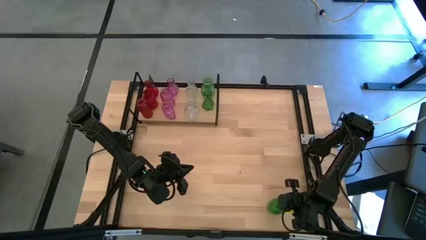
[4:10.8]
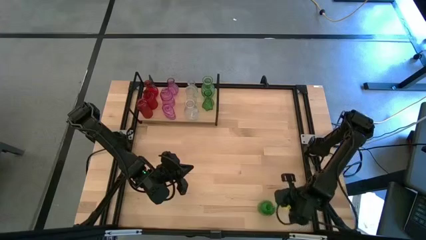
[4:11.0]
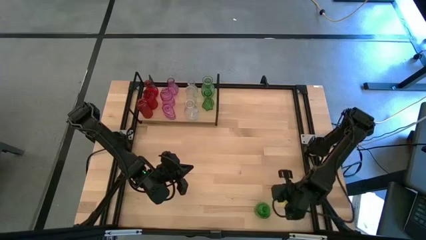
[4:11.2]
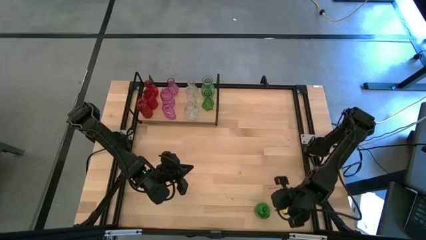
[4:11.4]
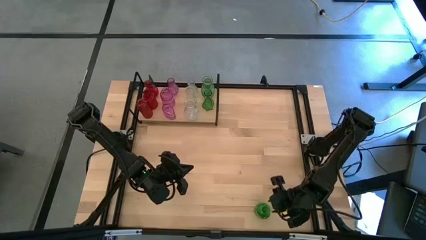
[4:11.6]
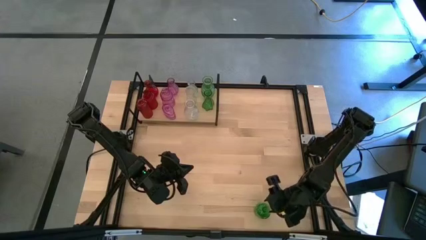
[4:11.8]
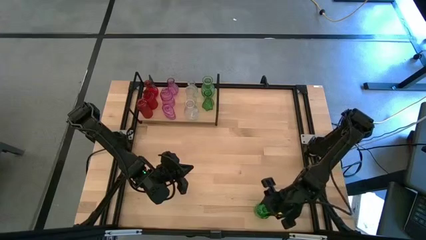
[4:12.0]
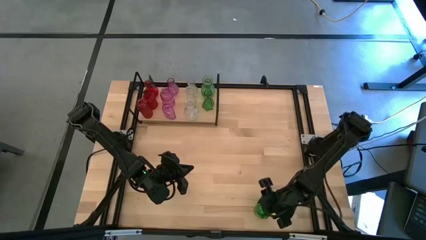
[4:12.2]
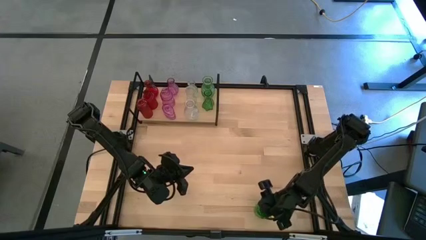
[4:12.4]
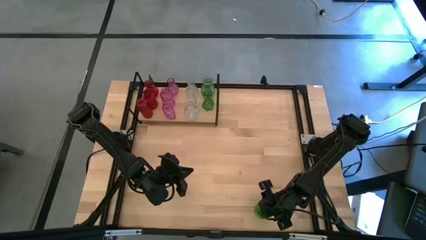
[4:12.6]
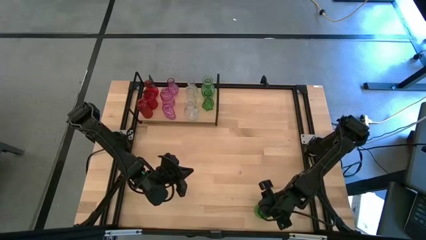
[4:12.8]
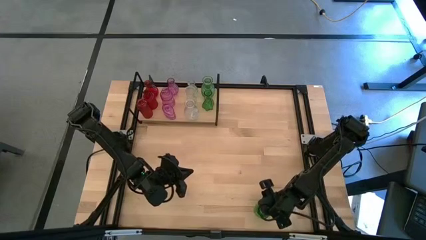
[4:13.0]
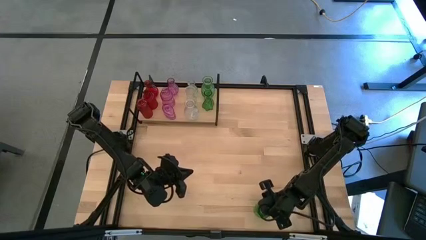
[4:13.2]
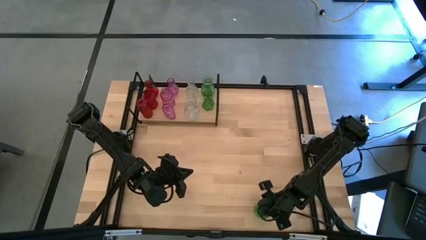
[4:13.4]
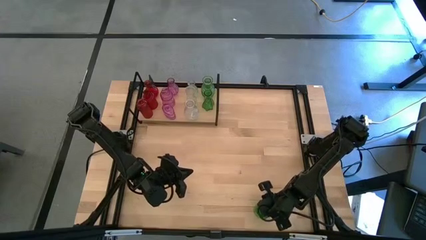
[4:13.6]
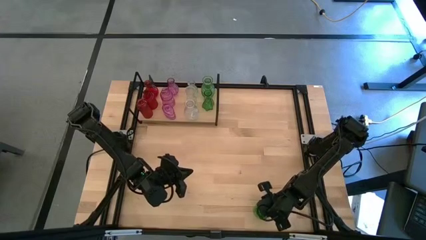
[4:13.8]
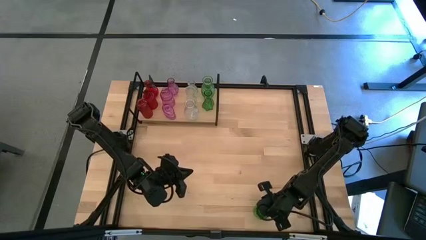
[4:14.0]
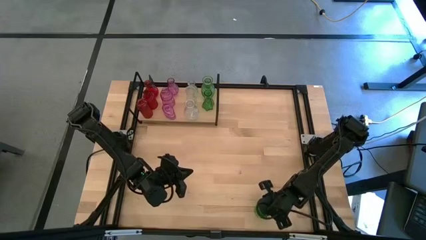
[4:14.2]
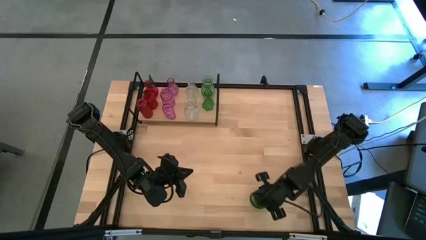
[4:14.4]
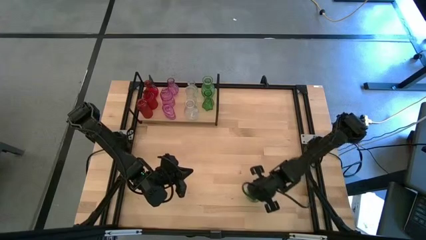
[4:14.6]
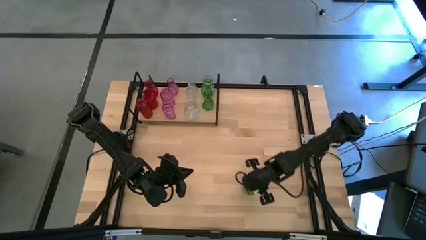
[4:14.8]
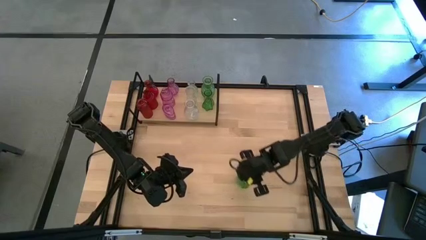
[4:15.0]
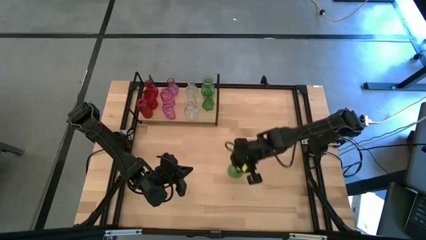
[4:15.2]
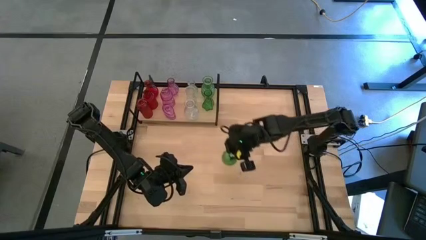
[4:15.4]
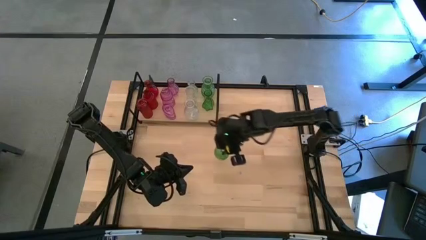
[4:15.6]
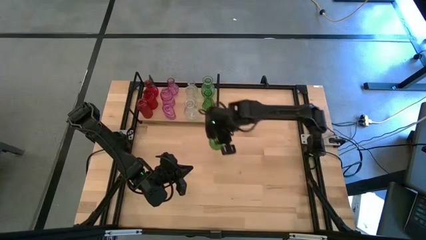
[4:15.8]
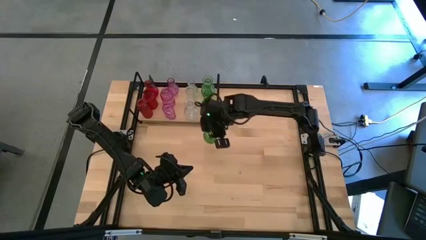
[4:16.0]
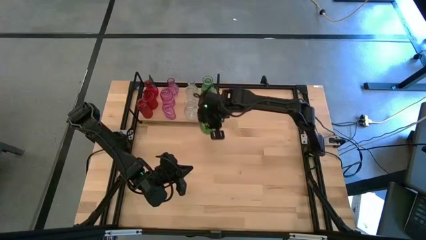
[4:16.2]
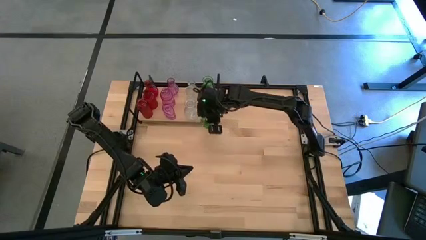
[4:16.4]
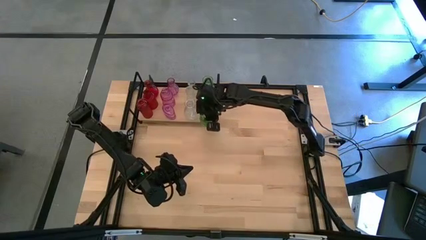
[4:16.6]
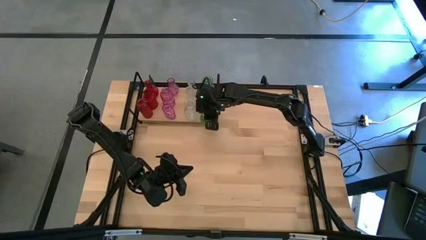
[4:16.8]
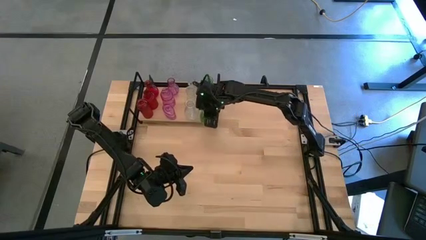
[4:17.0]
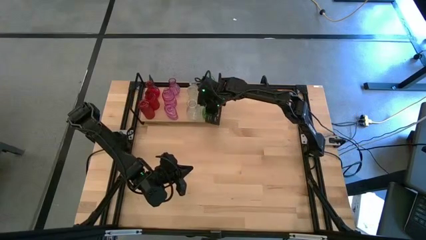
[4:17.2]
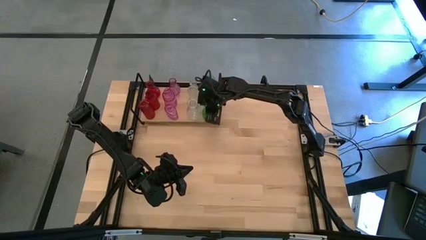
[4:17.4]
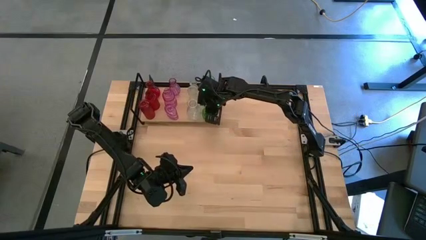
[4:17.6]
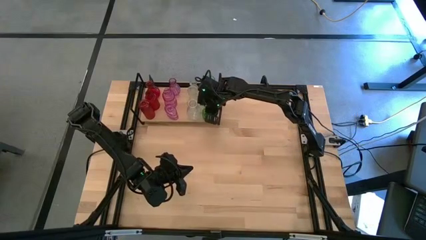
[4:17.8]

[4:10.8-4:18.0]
Task: sort vases onto shelf
Put the green vase on the shelf aligned with the other green vases

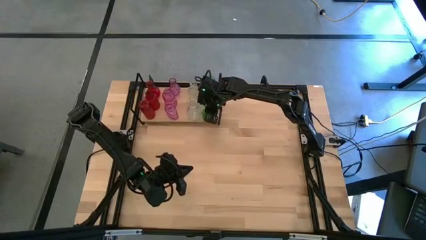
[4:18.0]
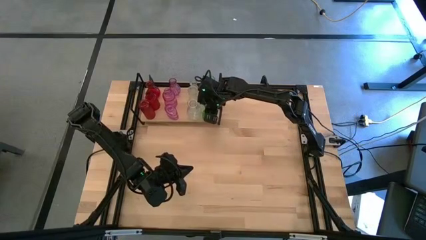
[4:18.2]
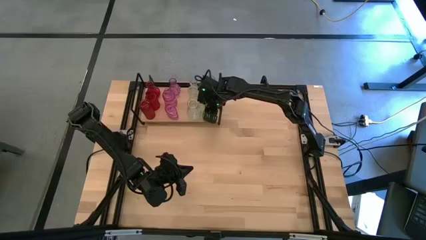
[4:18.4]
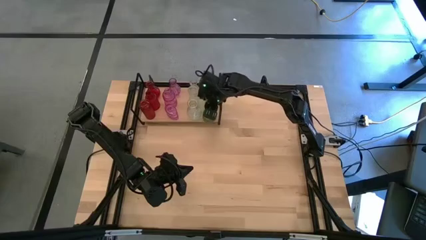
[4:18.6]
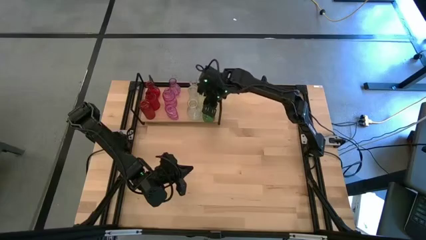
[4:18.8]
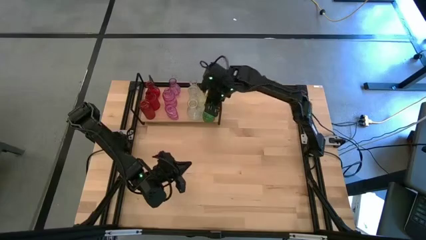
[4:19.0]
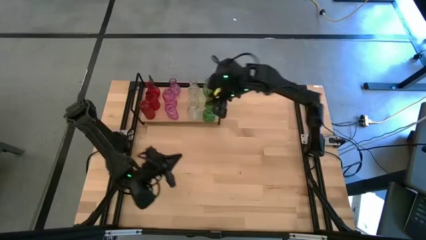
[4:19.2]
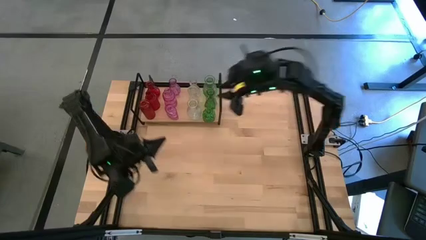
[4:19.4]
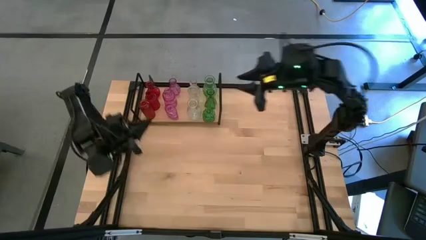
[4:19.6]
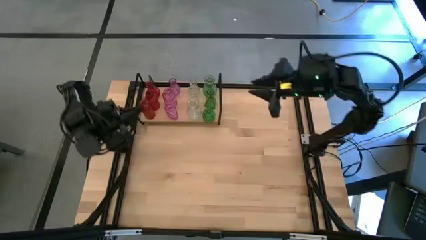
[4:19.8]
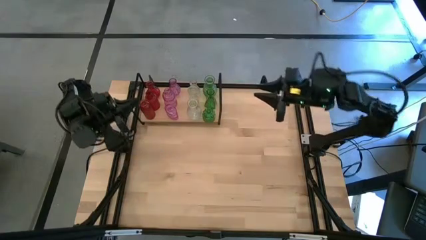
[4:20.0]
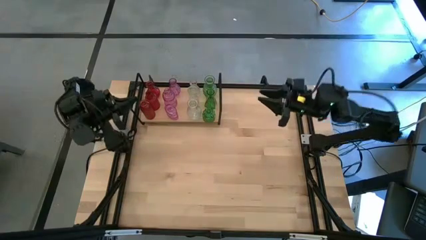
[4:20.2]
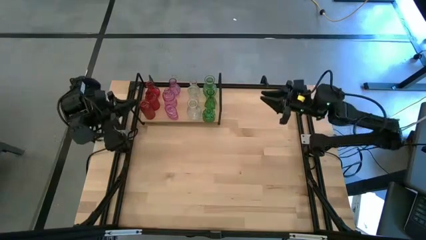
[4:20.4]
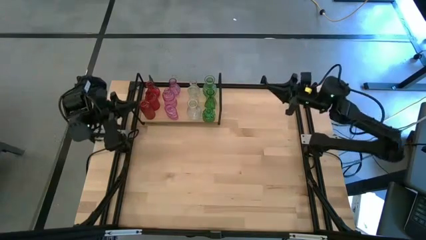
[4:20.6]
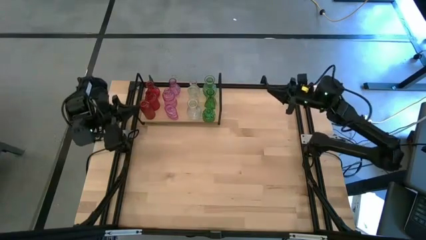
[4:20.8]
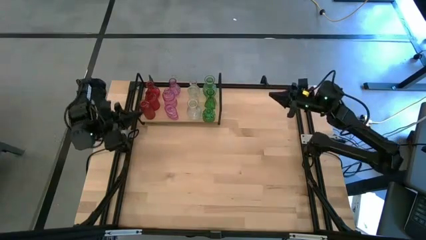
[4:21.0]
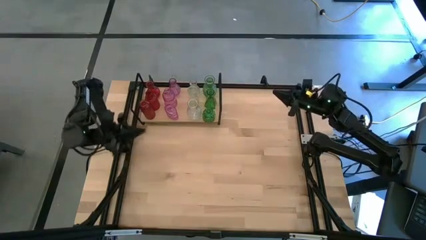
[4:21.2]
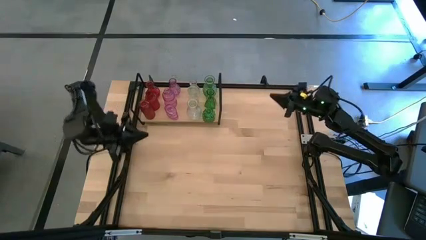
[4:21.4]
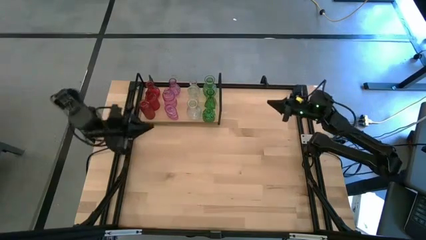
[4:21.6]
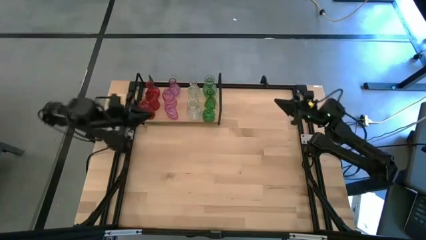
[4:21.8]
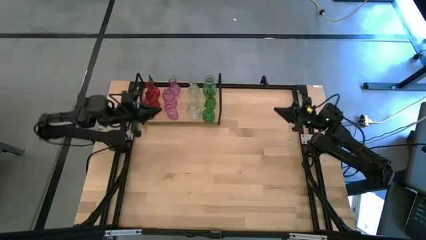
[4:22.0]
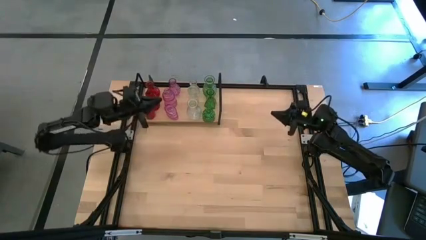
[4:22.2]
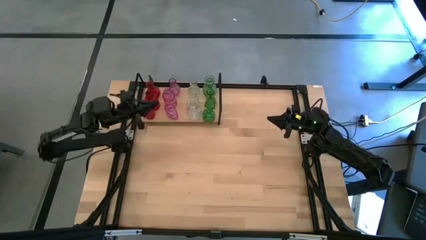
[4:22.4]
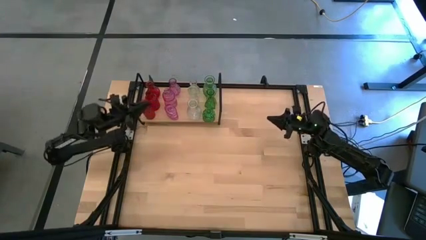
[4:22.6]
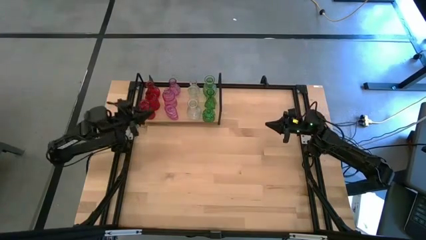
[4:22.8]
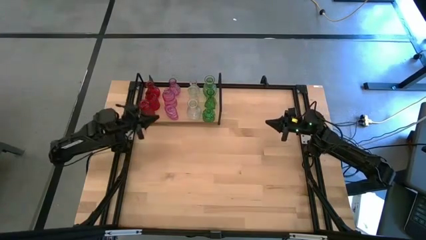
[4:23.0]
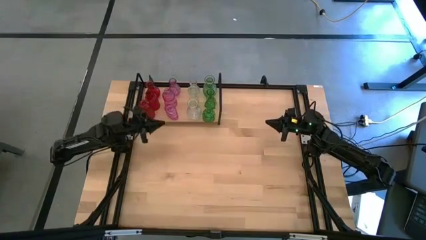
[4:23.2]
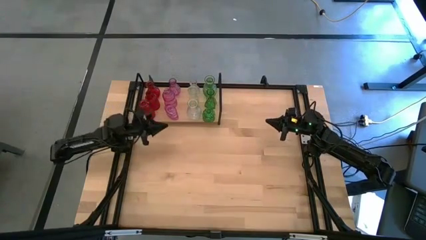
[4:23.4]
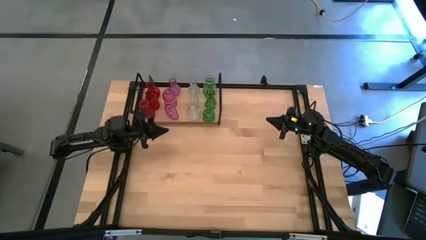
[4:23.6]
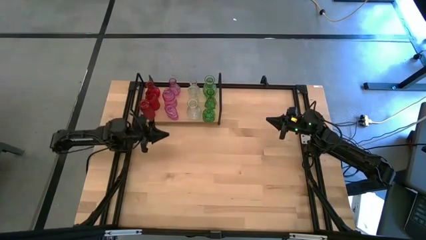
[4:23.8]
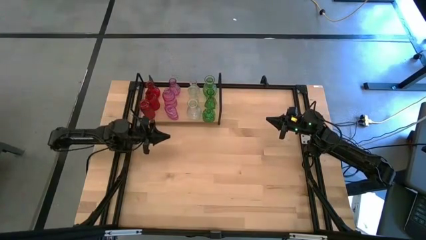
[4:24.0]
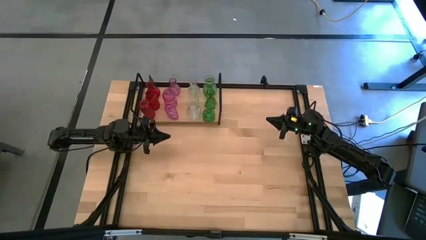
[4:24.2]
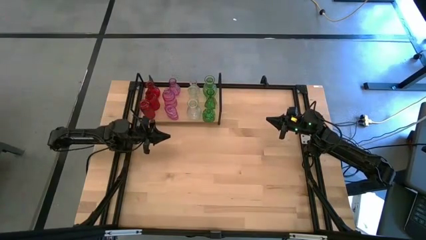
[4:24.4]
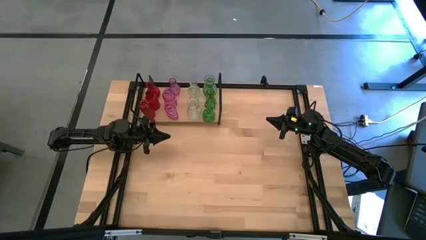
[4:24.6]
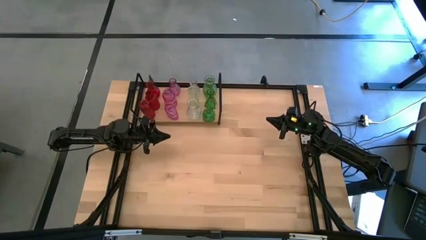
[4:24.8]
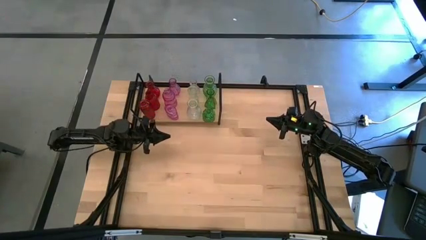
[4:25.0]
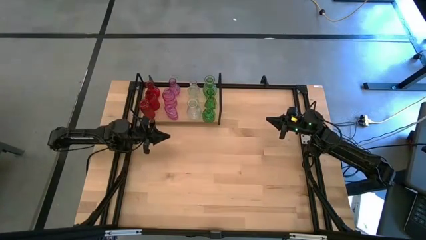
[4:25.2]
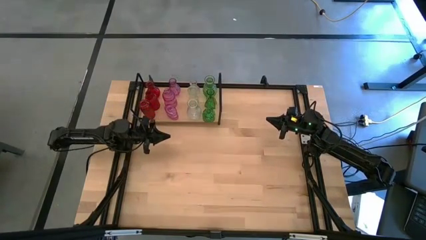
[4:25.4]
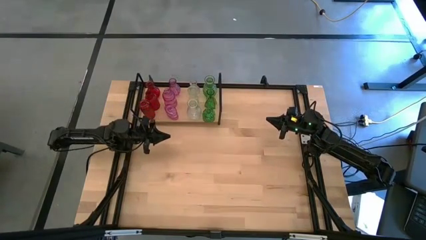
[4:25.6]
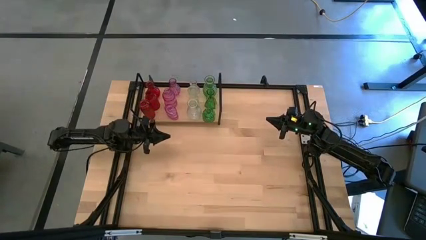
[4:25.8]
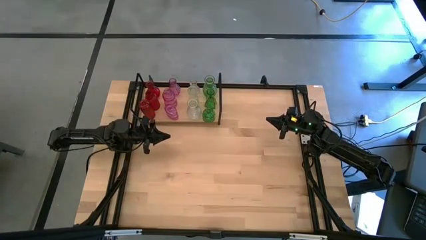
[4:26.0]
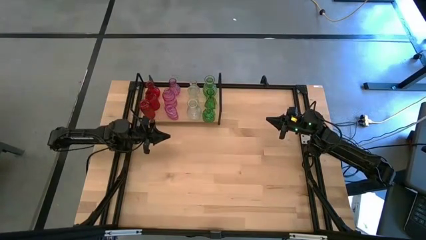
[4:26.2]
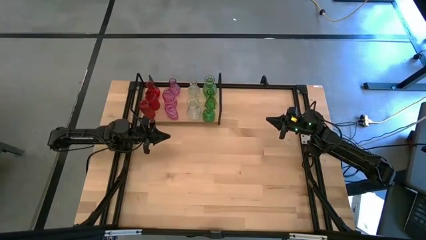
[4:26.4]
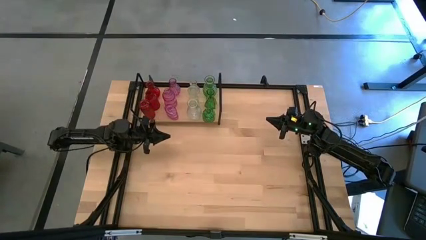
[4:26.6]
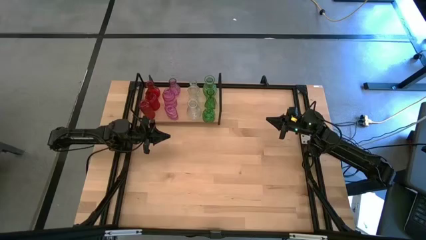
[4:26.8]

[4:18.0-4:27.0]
Return to Home Position

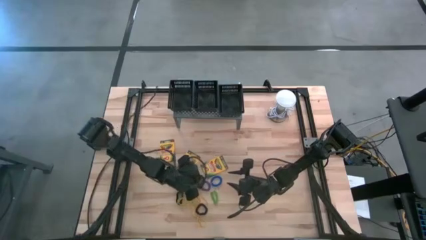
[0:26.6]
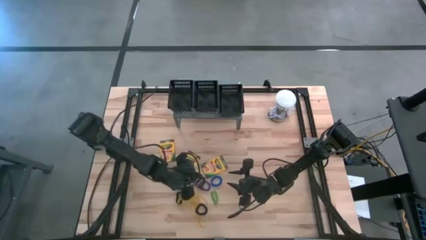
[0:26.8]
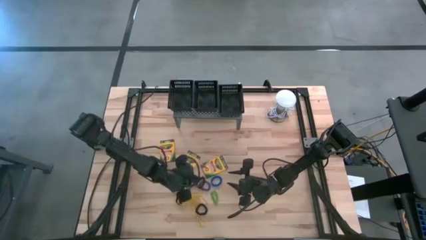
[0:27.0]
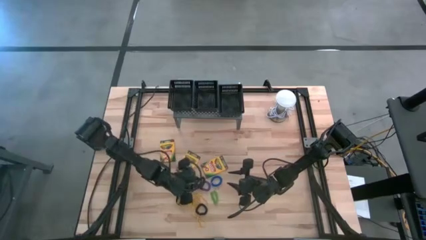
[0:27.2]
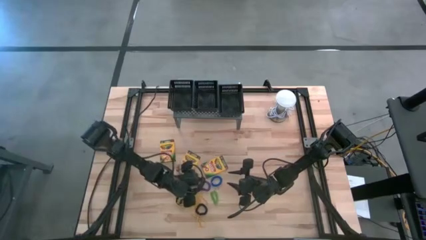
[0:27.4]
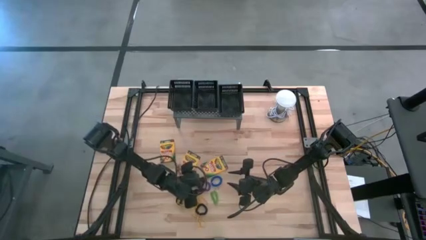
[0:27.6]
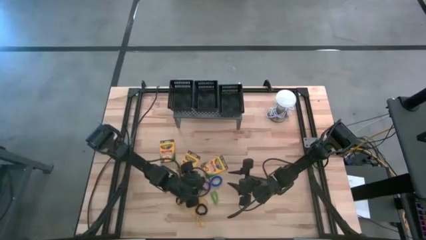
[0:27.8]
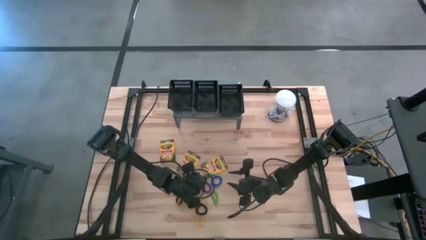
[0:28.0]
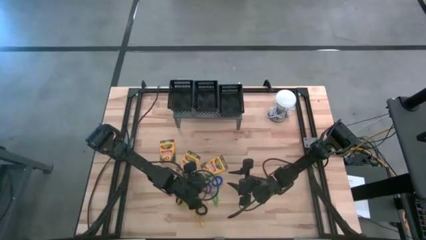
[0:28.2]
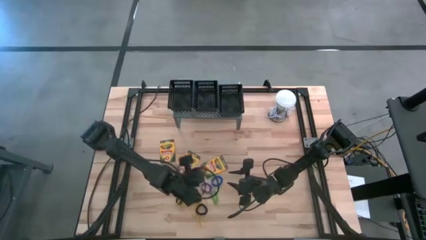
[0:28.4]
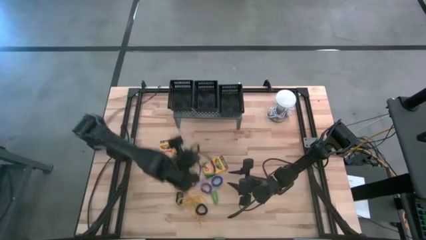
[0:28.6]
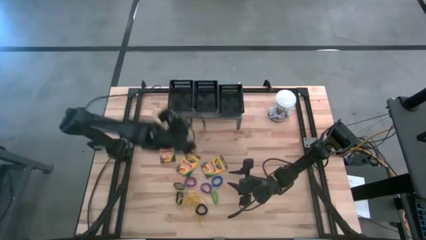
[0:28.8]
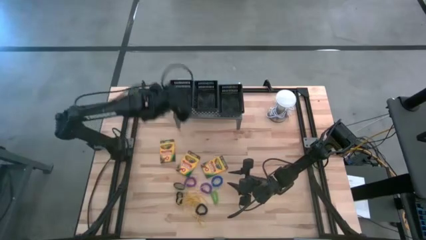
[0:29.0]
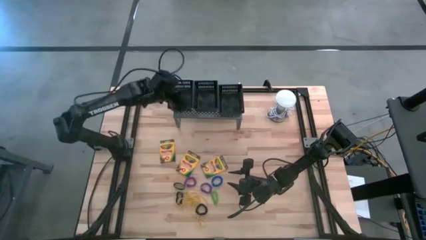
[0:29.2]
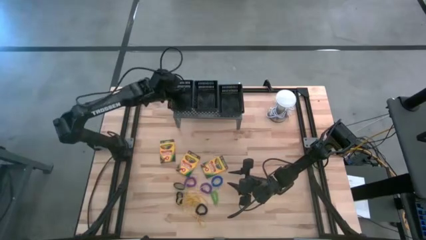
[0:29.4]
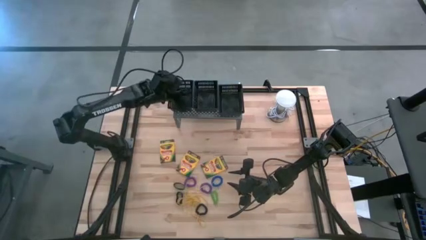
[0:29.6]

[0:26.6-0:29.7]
Task: Pick & Place Office Desk Supplies
Put the black spring keychain into the left black bin on the shelf
